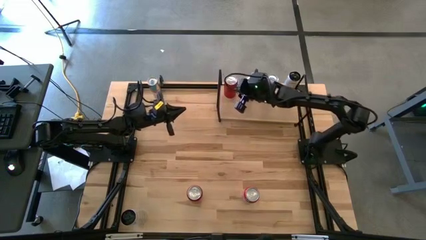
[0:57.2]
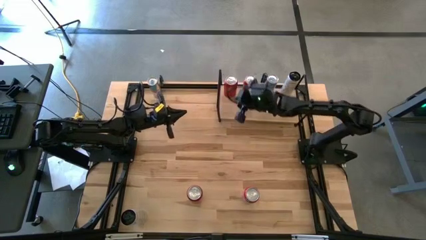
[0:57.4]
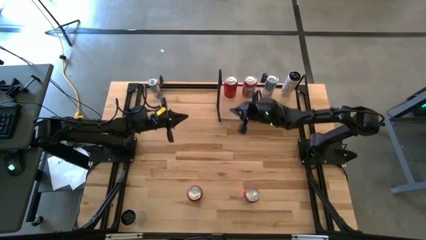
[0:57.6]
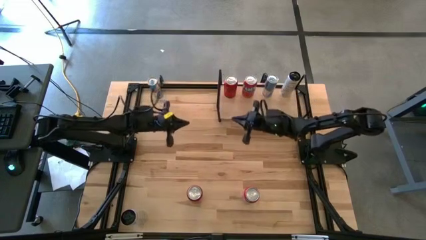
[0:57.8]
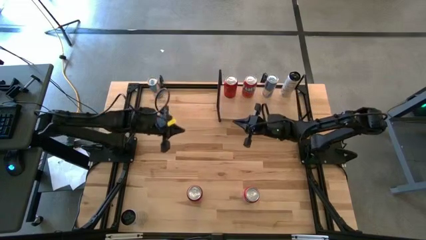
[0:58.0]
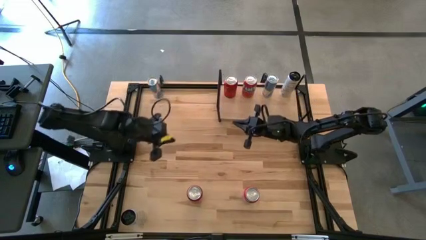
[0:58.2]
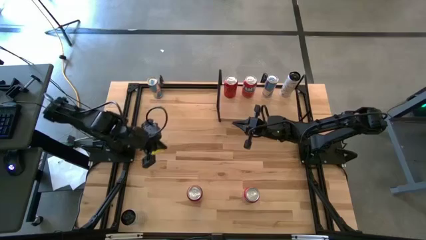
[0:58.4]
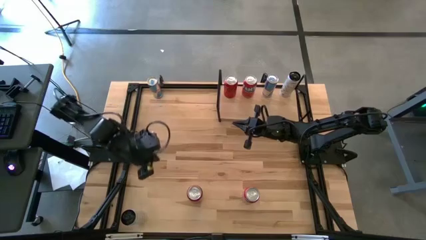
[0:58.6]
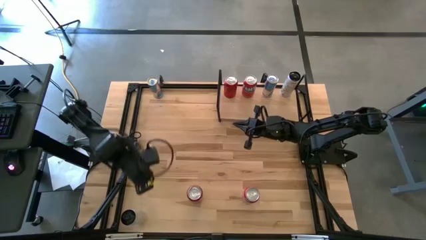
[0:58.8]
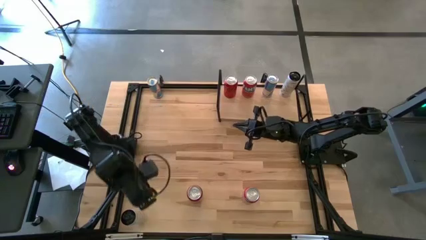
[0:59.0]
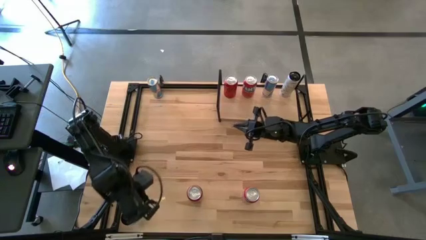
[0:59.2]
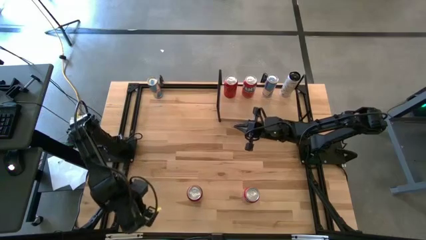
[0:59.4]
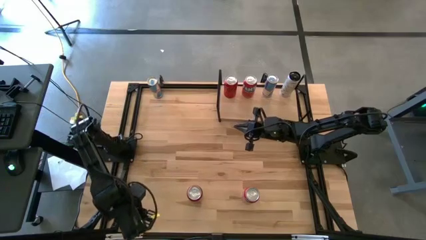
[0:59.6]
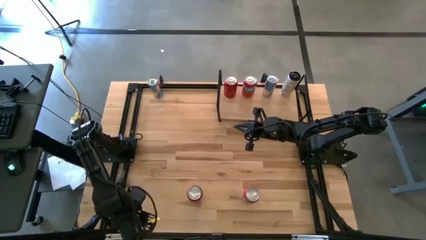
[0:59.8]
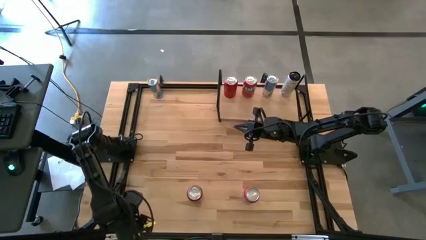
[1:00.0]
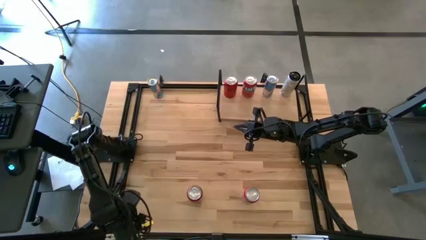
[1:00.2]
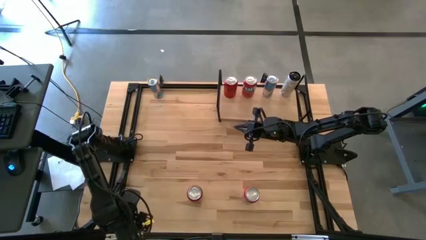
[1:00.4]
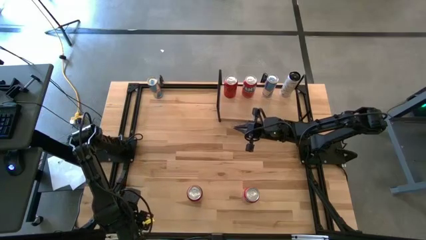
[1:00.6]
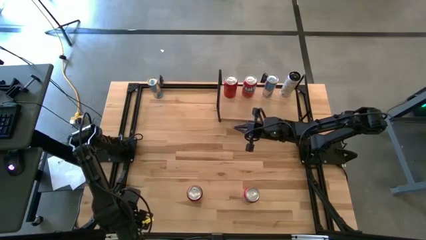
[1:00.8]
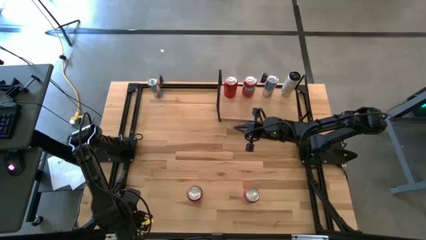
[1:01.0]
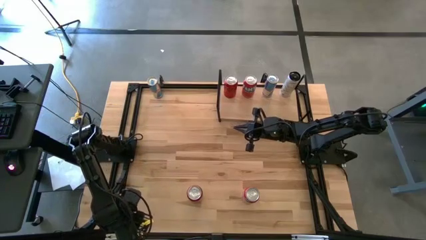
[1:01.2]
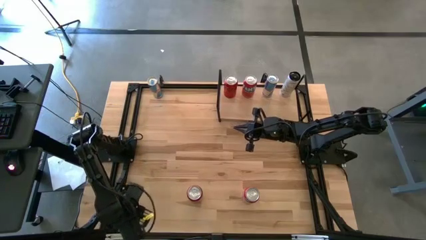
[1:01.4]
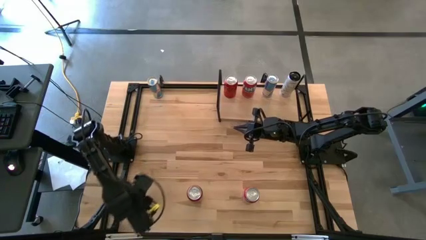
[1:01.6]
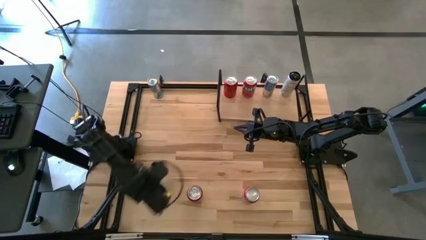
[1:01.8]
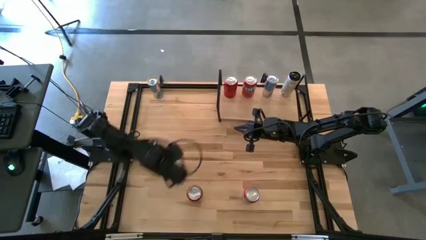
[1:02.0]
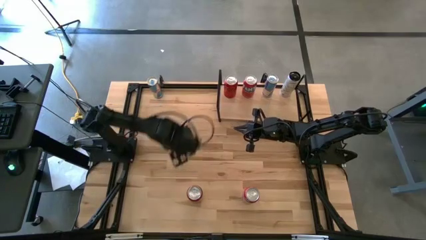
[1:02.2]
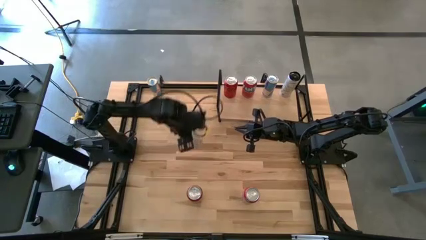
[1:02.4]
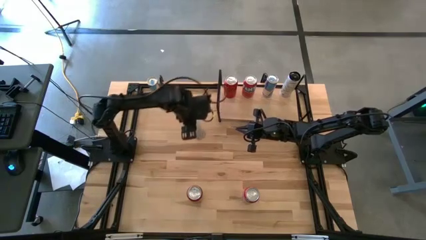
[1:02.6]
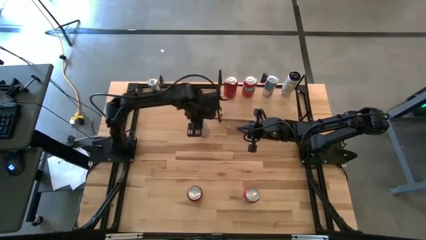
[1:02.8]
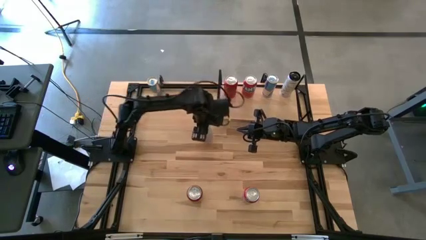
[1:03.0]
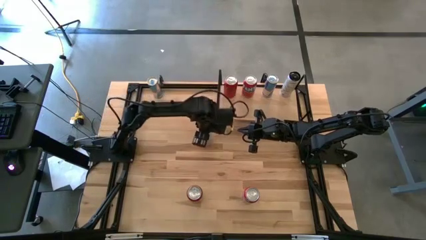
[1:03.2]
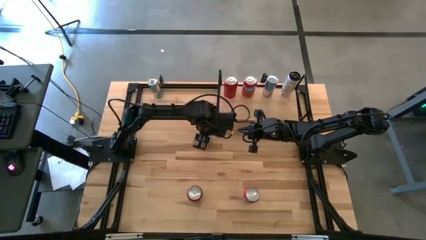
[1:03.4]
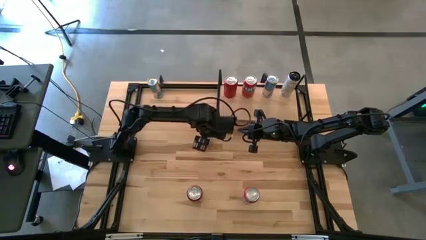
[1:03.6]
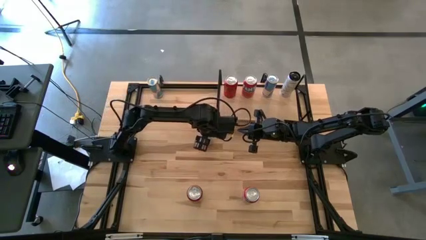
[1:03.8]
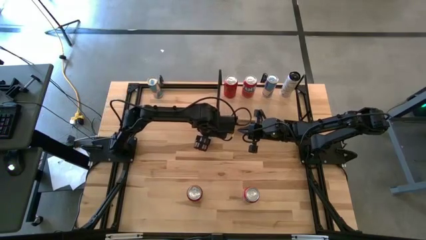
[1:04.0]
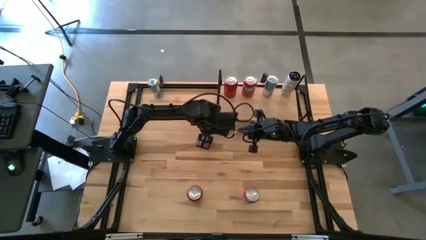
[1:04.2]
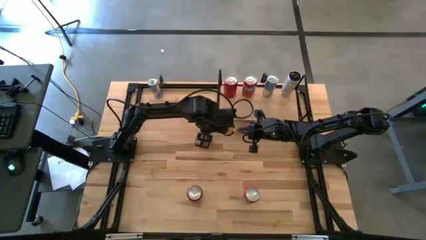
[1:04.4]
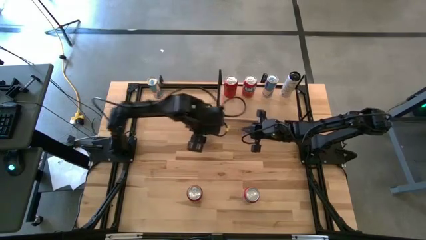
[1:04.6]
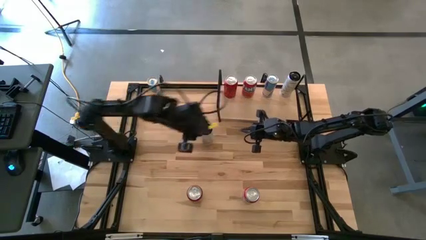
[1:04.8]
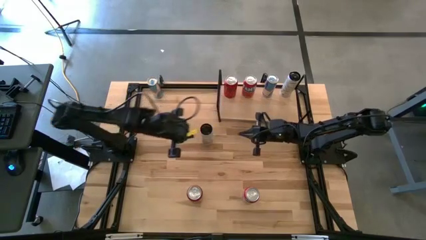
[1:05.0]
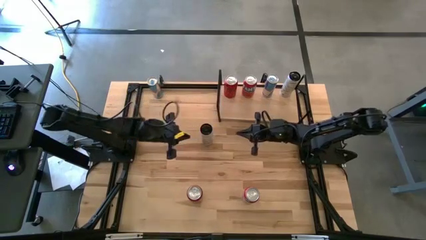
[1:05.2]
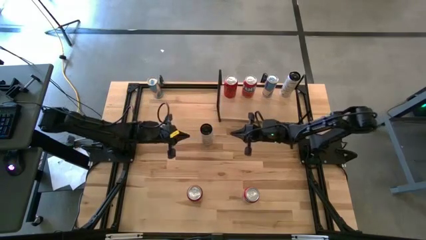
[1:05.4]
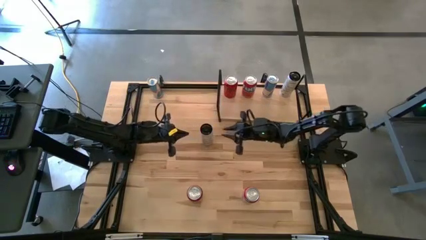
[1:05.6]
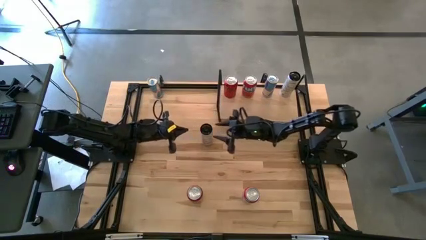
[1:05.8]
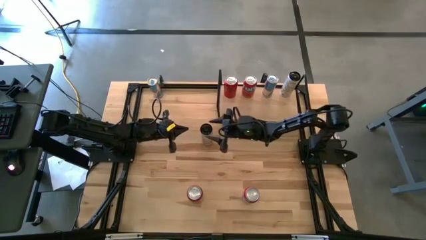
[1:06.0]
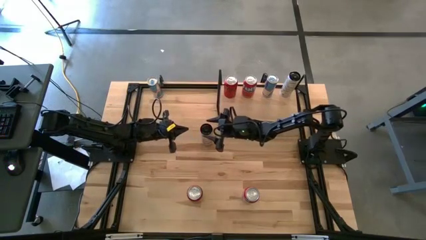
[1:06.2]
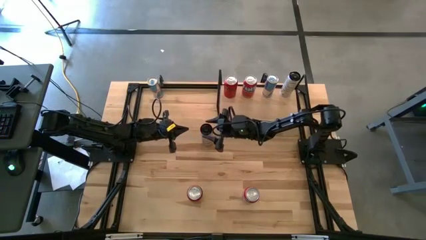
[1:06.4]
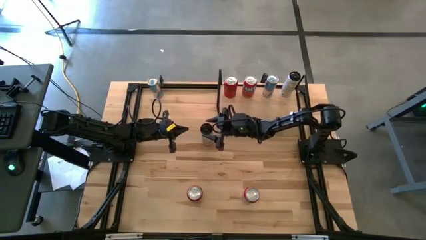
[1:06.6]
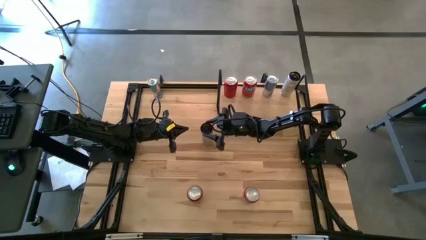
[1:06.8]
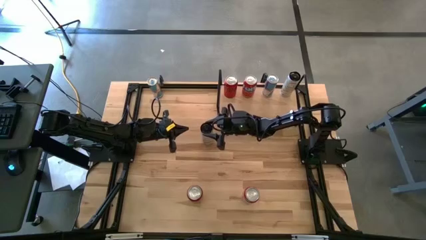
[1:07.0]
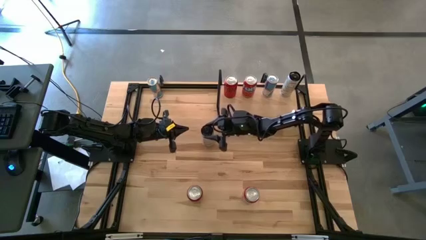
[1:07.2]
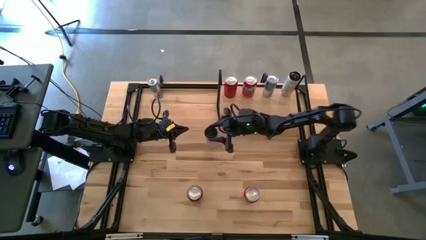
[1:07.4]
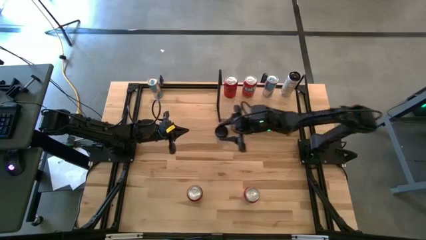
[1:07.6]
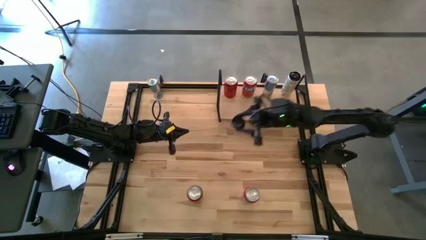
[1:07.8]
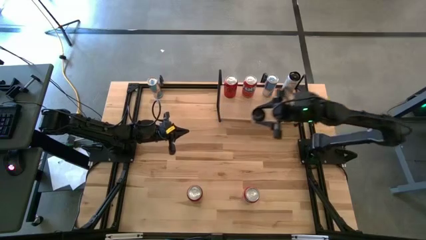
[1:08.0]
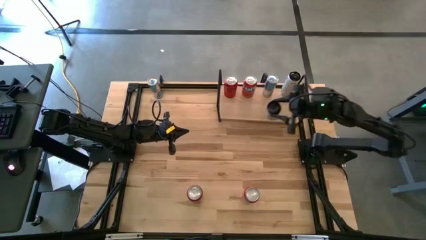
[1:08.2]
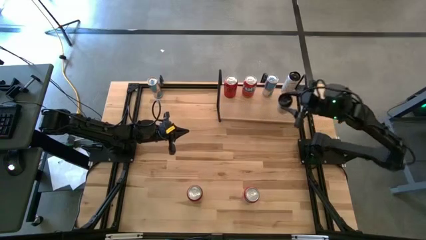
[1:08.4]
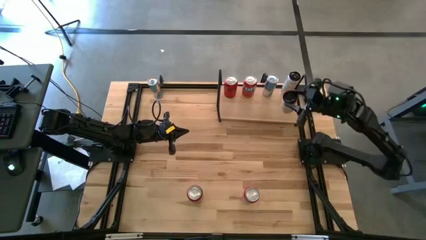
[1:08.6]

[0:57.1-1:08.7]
Task: Place canned beverage on shelf
Put the white-yellow soda can on the shelf aligned with the other white-yellow soda can

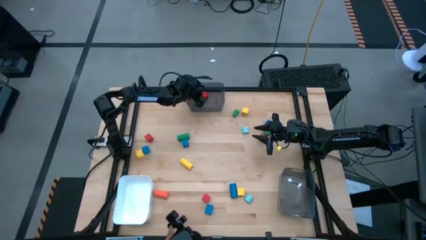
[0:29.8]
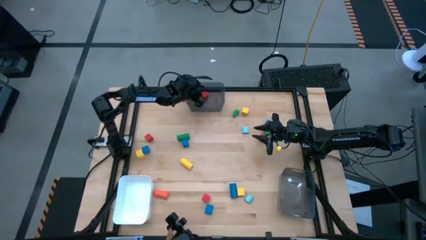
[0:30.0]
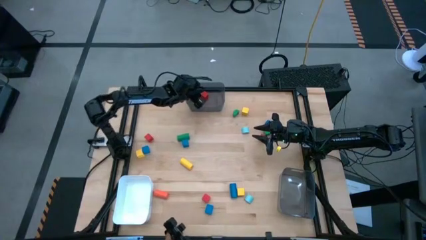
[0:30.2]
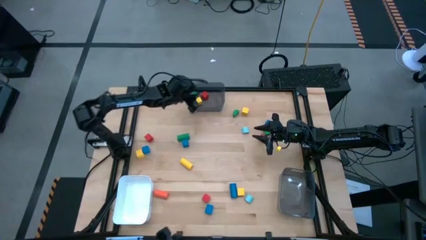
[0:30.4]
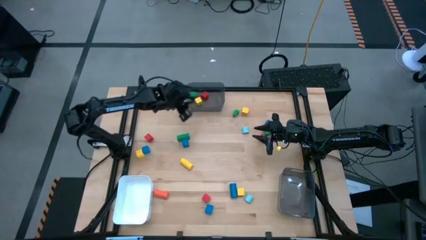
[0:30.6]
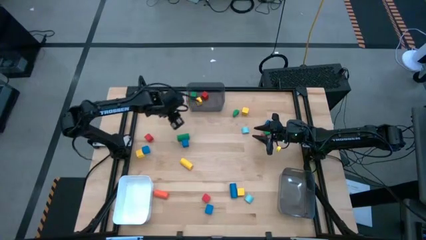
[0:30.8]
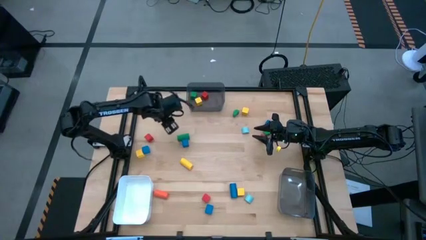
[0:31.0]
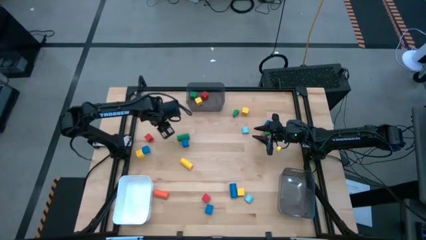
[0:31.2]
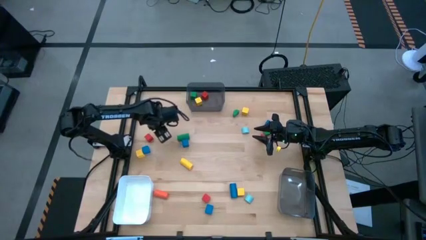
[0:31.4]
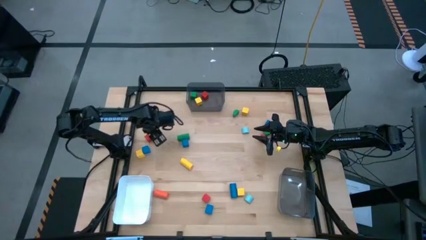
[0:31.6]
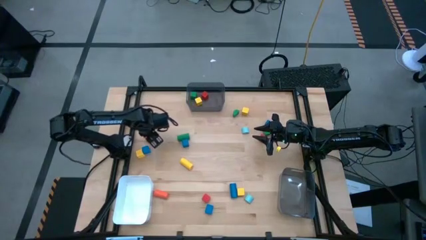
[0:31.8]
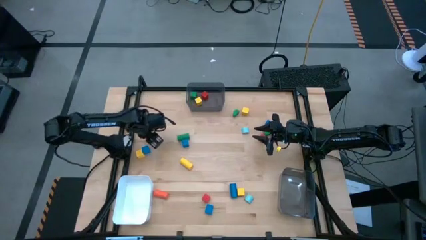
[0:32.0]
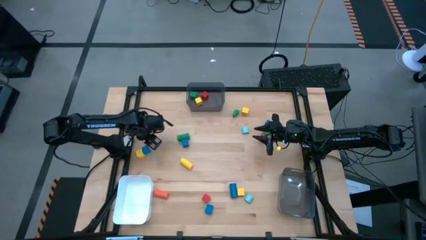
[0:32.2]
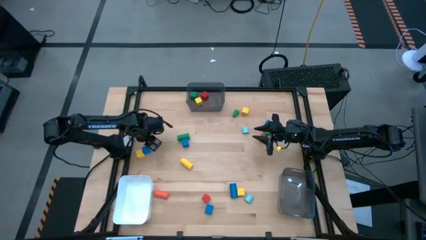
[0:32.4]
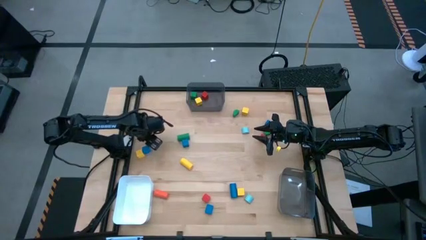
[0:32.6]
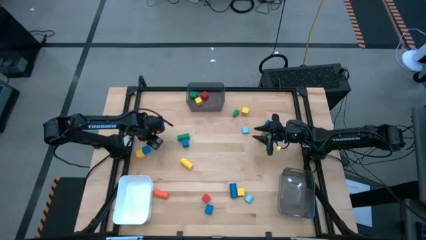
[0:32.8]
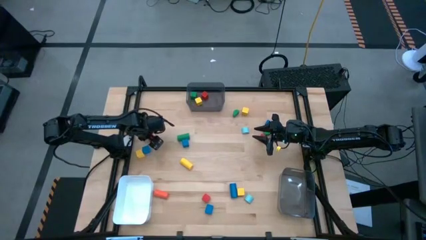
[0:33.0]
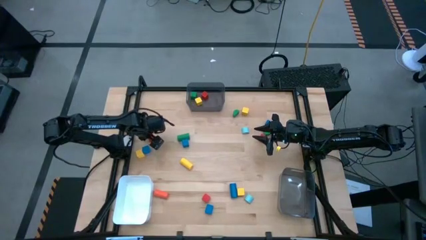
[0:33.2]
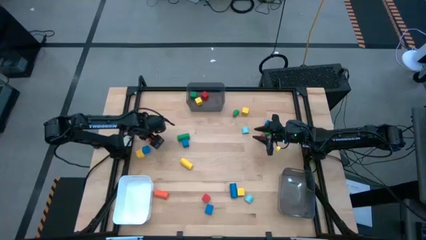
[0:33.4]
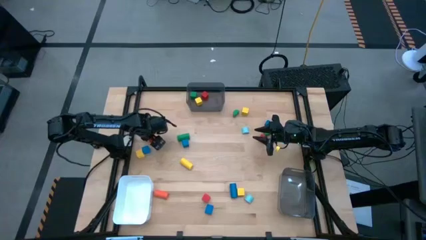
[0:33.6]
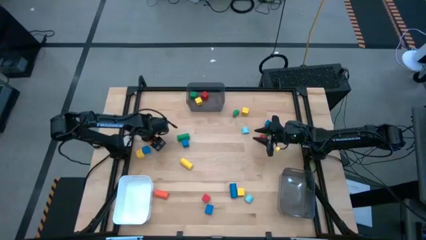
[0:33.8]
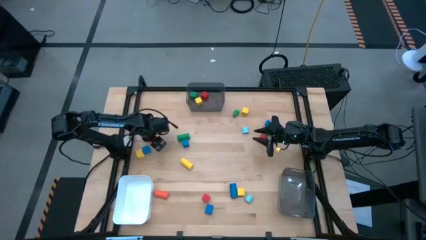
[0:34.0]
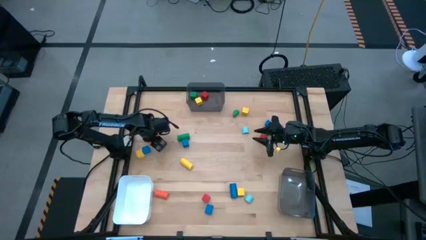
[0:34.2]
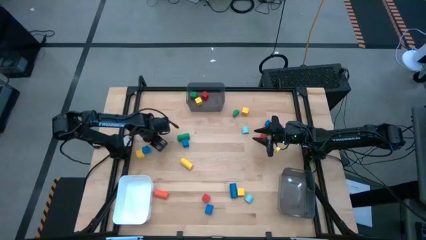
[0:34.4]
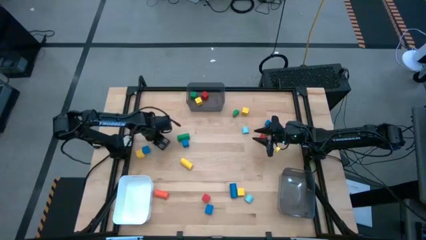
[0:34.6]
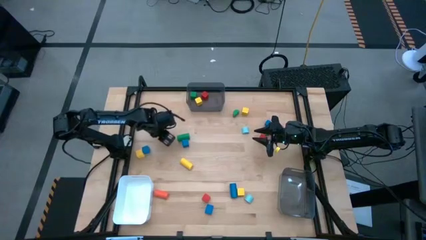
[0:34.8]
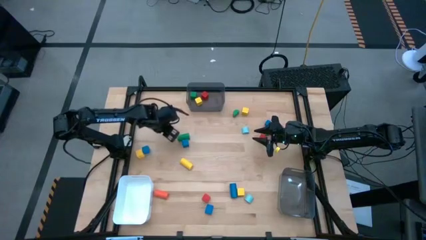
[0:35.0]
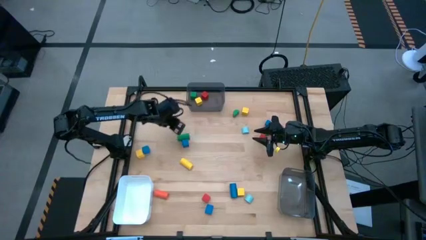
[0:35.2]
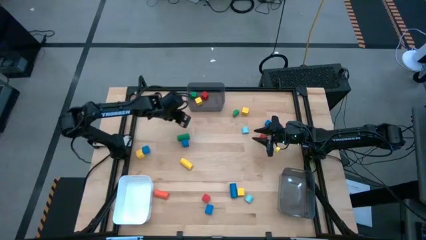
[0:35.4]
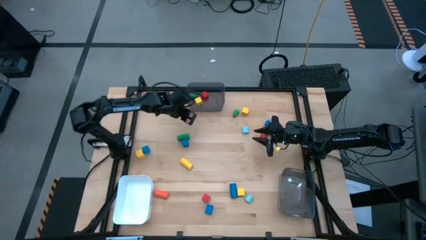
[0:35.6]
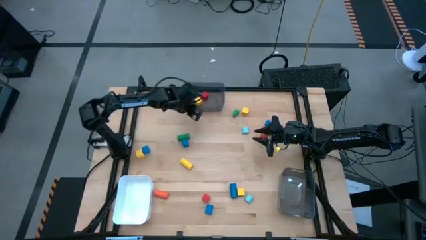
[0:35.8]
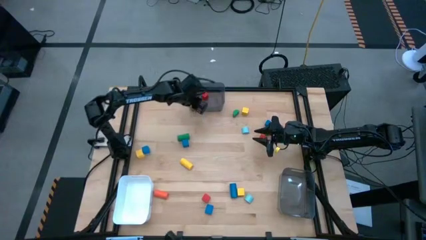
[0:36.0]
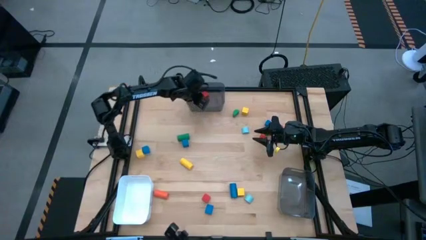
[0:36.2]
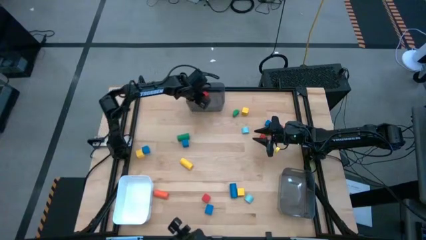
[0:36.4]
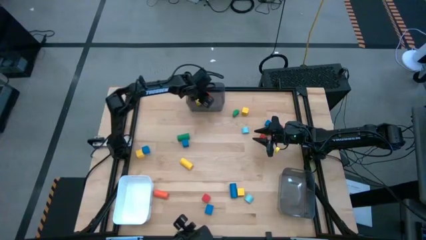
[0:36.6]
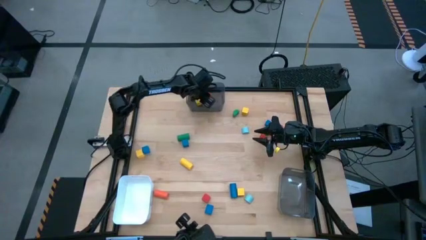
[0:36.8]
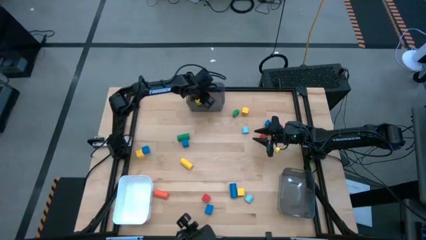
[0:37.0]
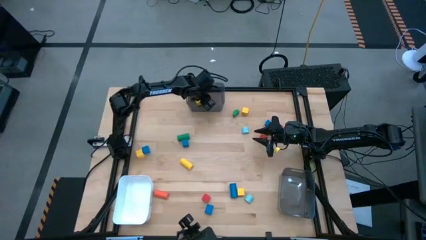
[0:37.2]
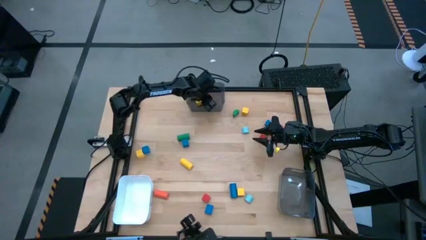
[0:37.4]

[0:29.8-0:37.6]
Task: Sort blocks by size
Put the red square block into the top black bin
